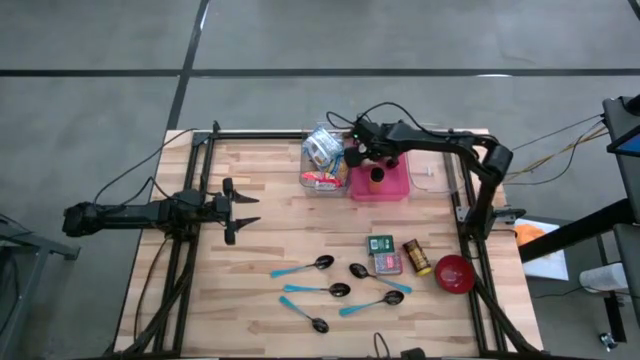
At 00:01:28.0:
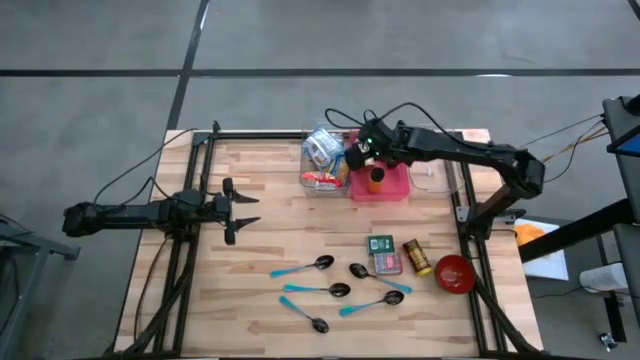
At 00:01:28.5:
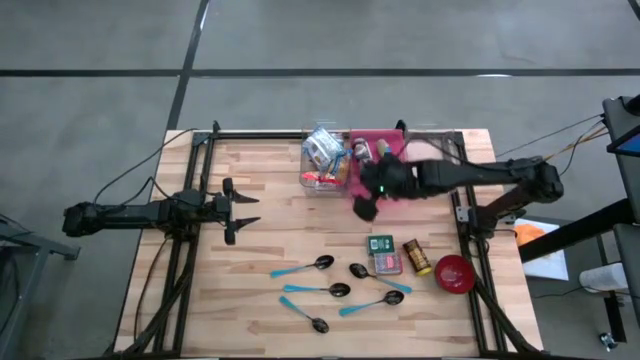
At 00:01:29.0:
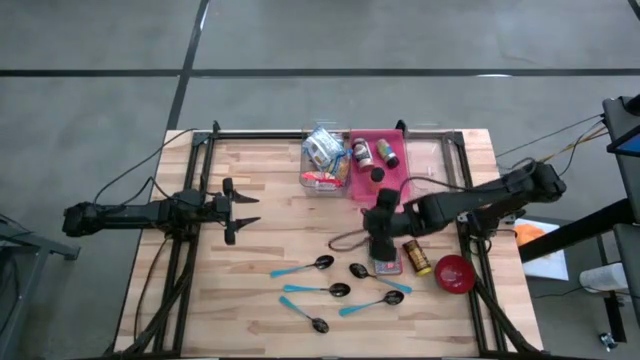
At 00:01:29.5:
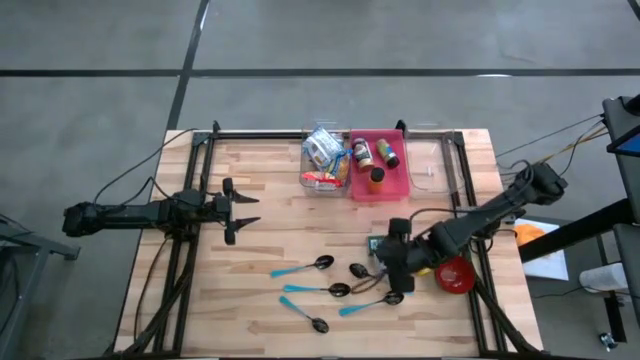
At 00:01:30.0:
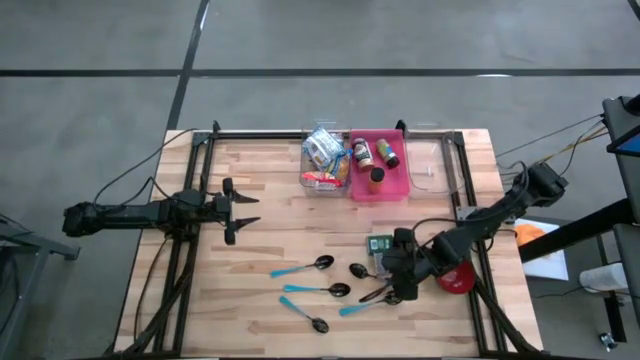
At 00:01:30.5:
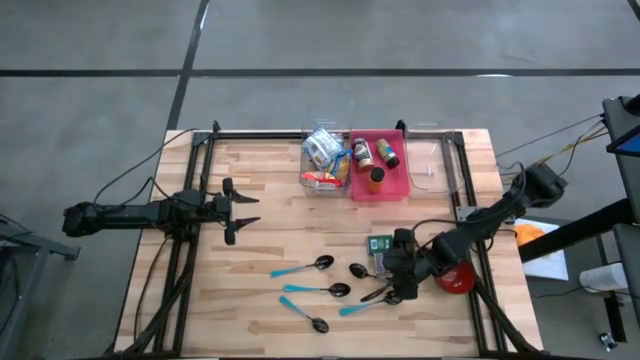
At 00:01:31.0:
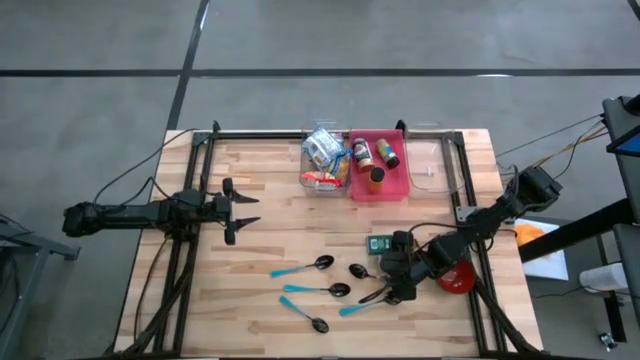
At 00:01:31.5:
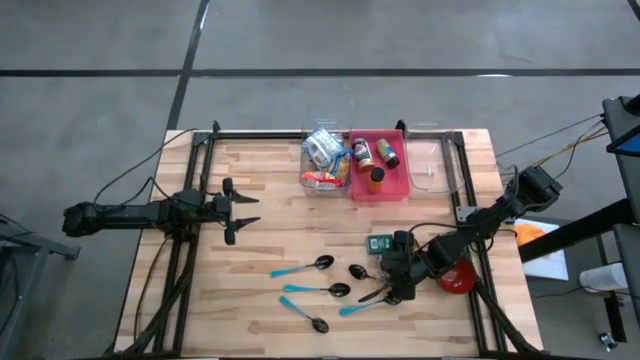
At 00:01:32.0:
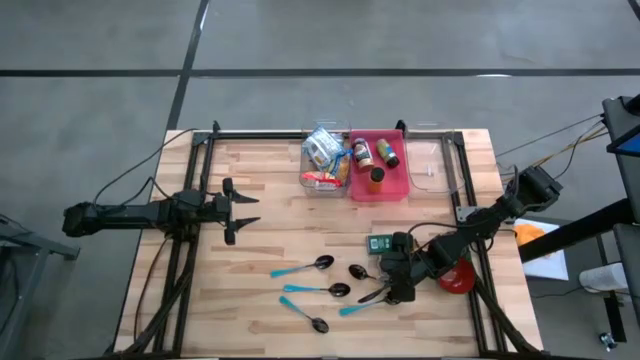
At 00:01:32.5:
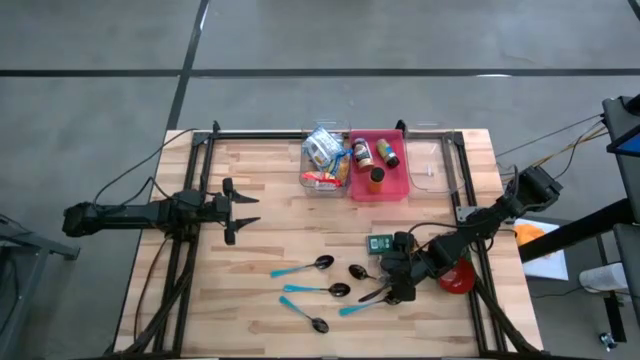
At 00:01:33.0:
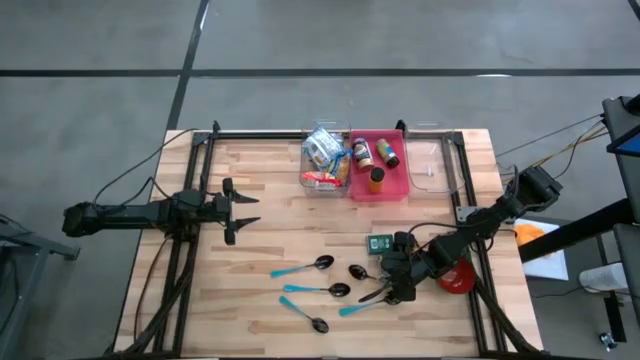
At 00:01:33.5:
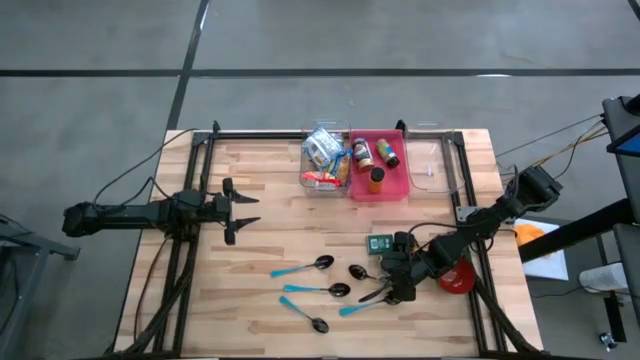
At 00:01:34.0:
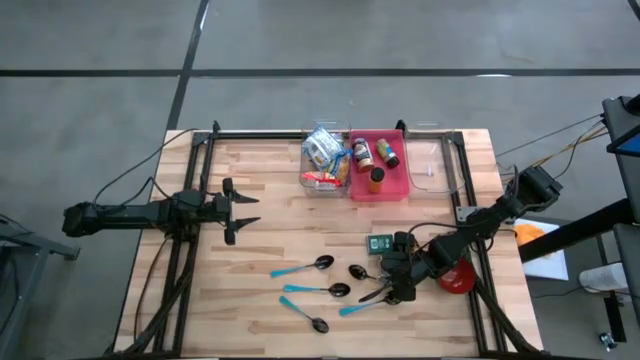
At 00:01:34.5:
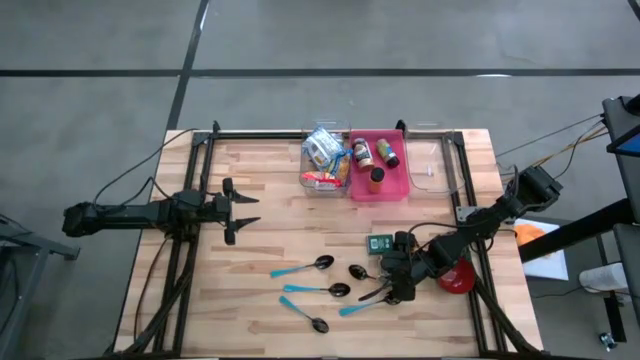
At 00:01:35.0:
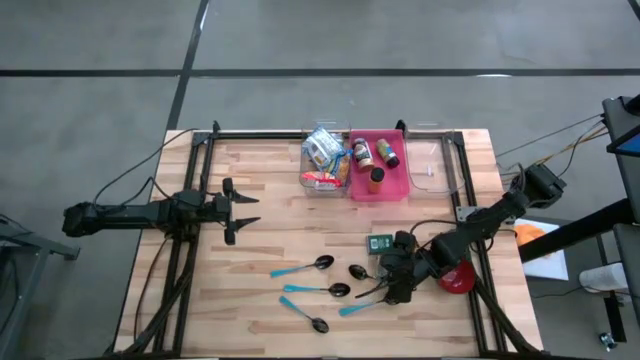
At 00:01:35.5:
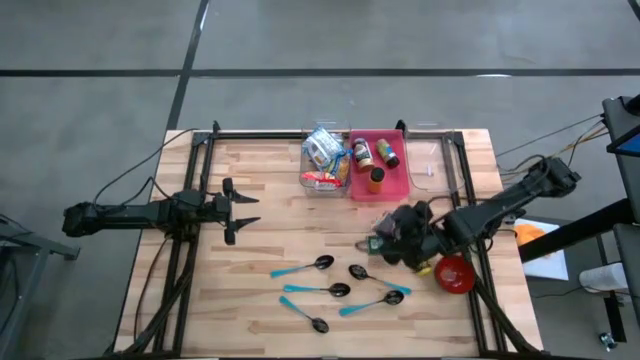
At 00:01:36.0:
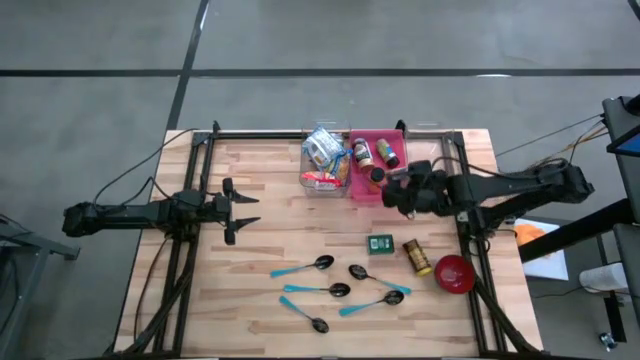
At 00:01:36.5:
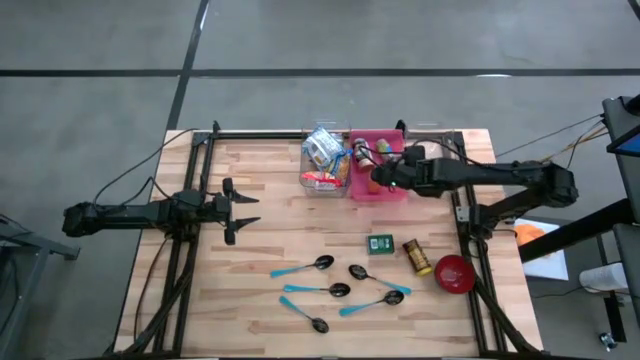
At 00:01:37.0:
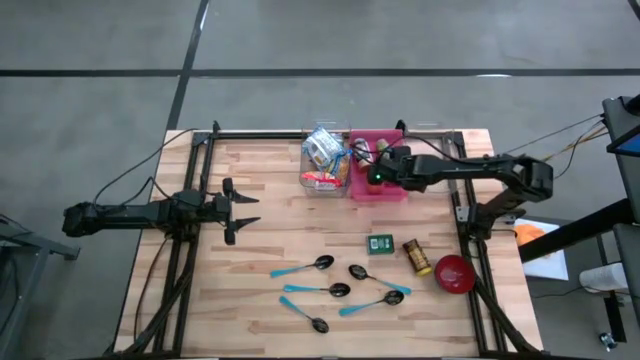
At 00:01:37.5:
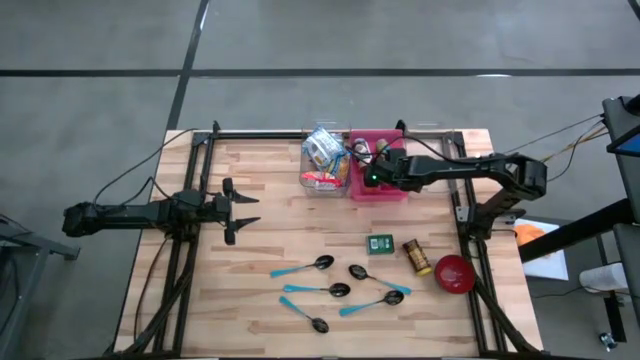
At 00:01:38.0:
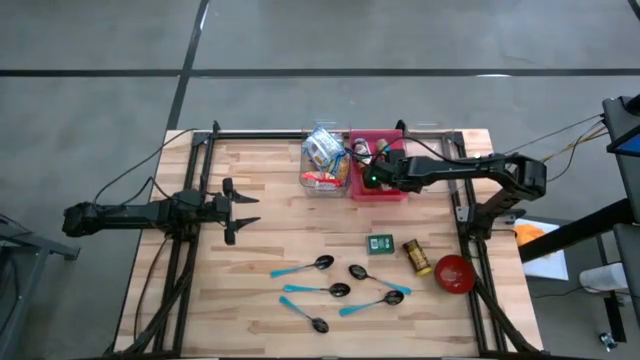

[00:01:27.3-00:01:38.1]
Put the red spice can into the pink bin

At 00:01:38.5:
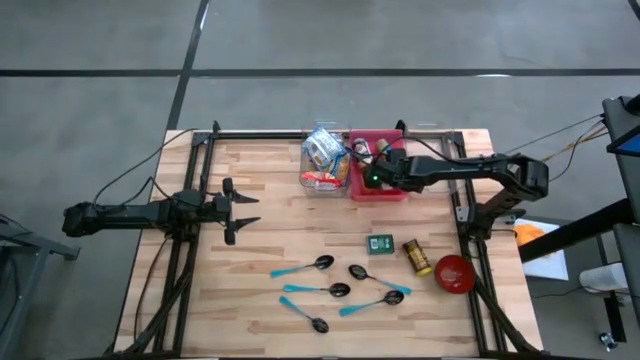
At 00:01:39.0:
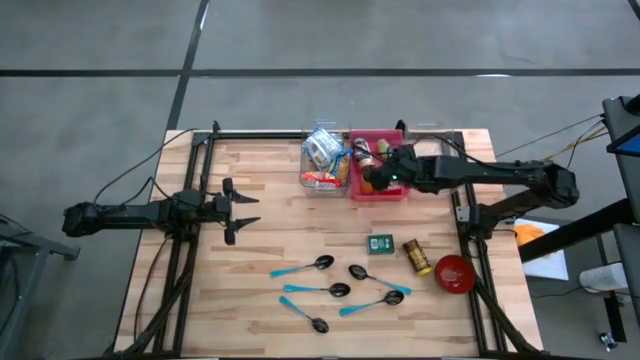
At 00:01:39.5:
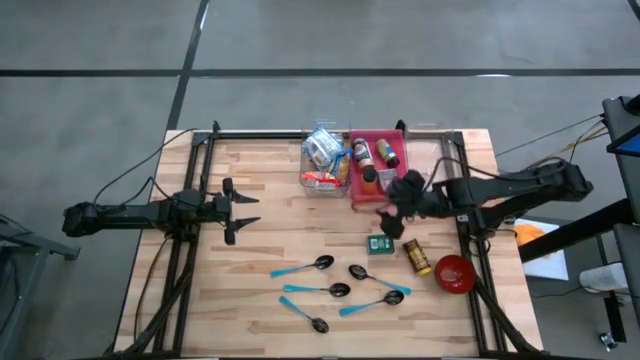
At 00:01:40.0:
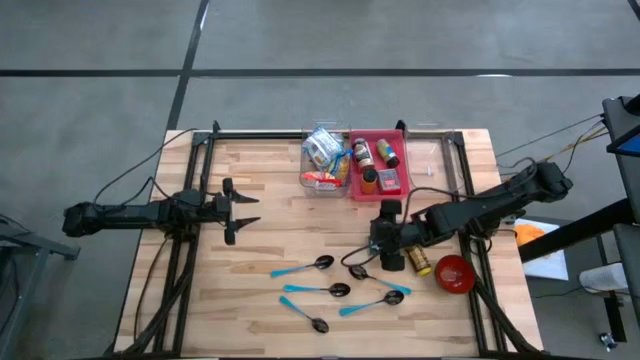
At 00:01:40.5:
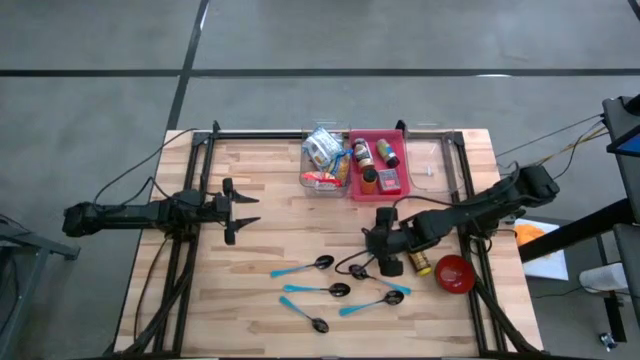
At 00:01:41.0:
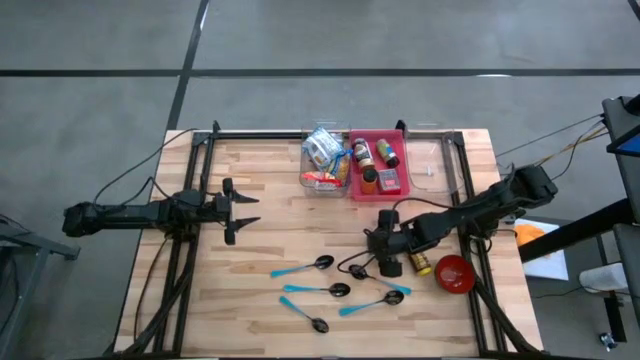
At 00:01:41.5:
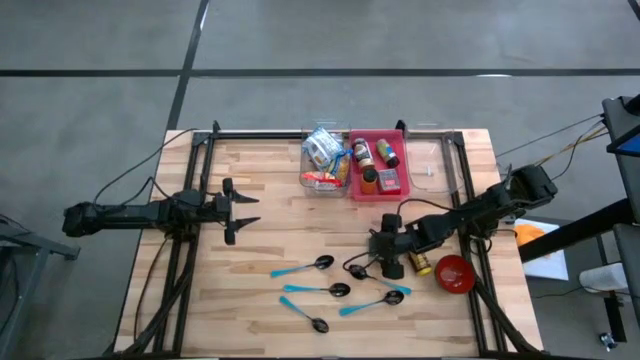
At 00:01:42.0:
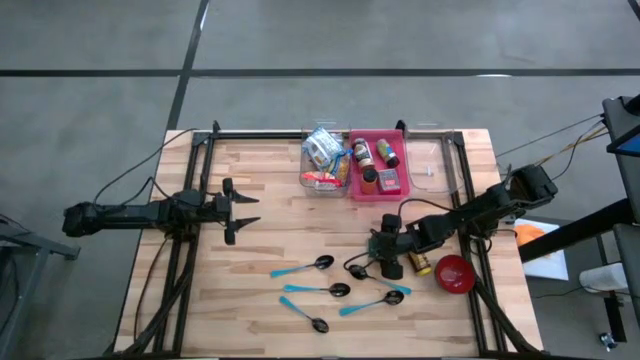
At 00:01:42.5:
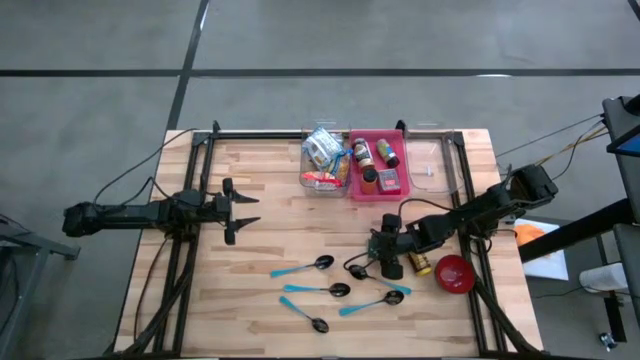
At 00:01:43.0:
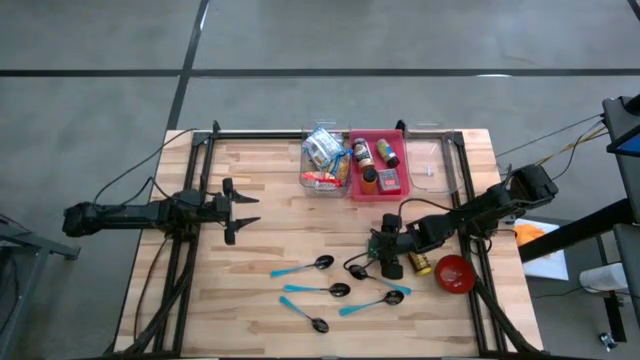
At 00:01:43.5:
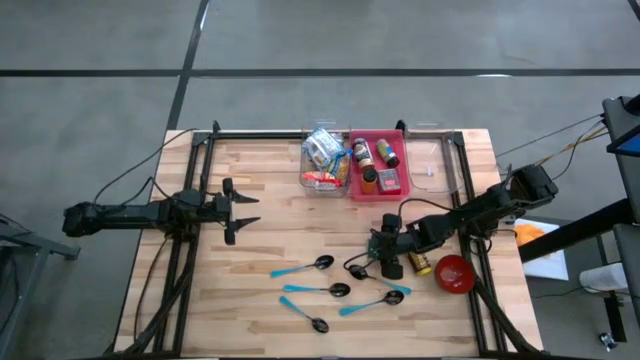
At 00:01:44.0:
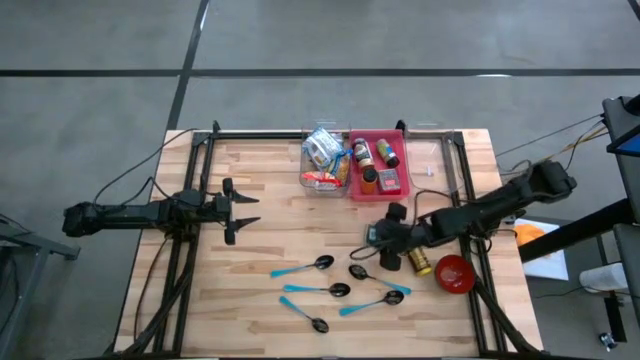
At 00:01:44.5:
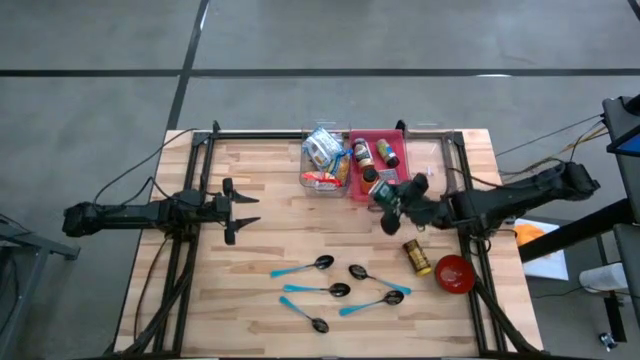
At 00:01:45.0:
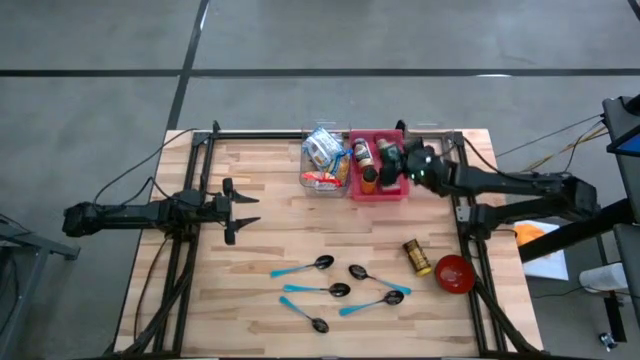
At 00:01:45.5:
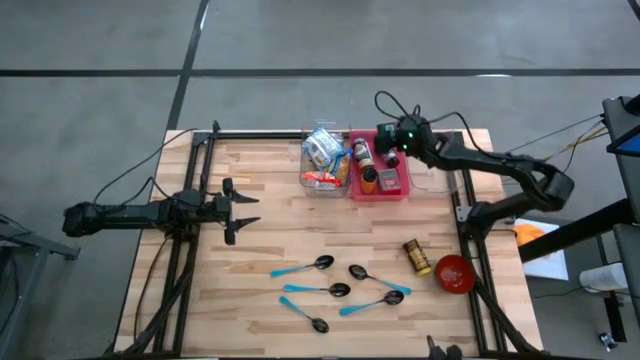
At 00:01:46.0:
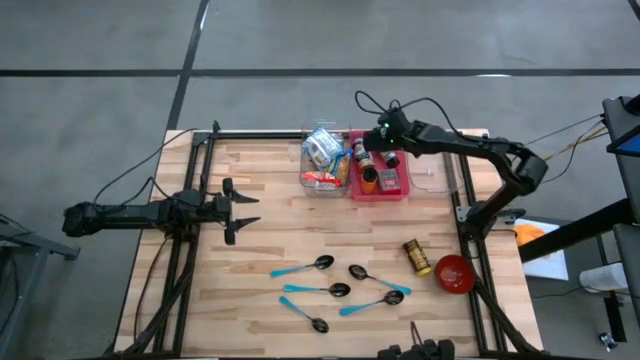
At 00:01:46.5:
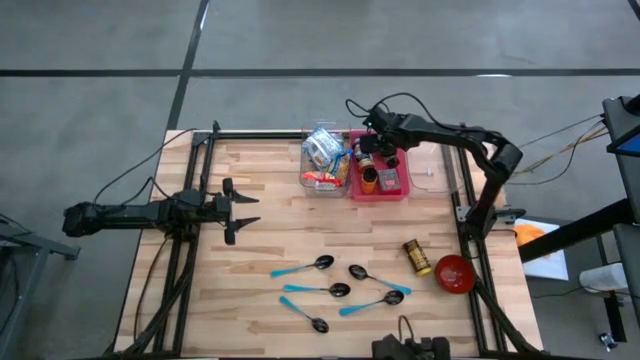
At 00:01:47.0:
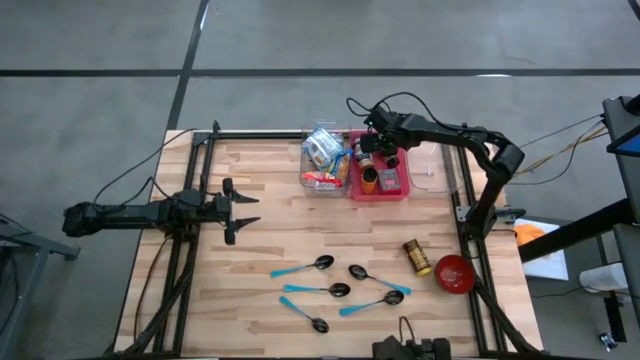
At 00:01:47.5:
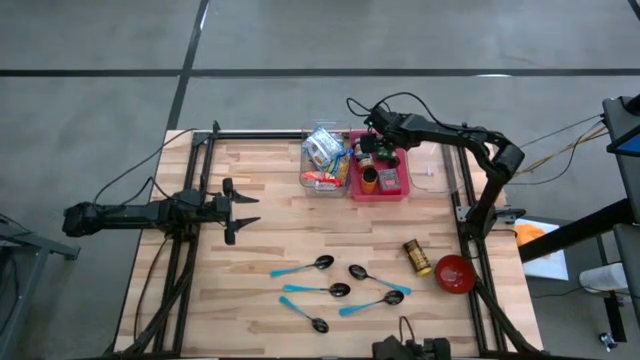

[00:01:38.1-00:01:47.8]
Put the green spice can into the pink bin
